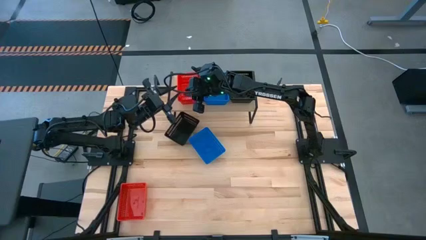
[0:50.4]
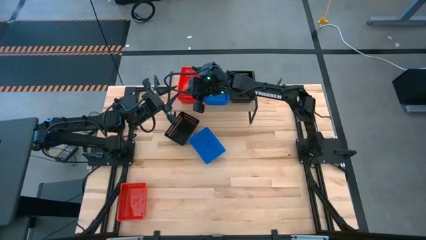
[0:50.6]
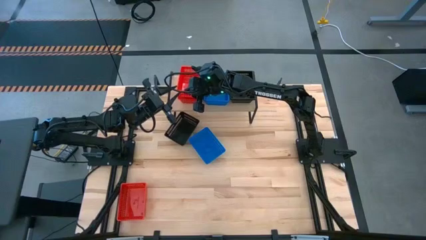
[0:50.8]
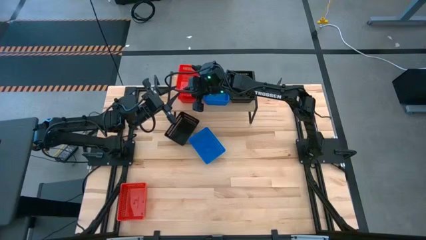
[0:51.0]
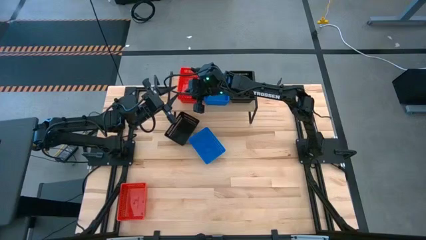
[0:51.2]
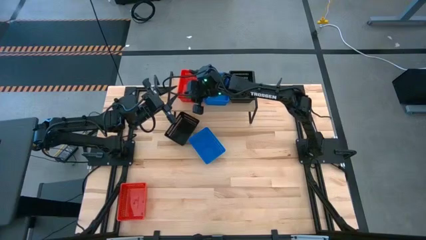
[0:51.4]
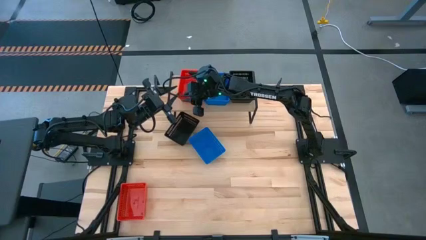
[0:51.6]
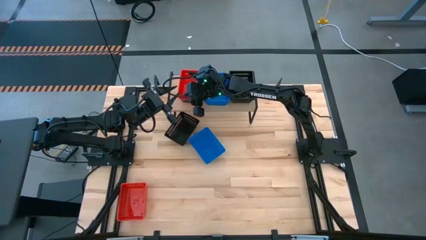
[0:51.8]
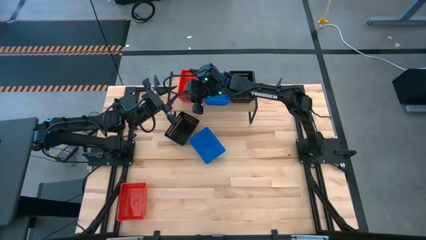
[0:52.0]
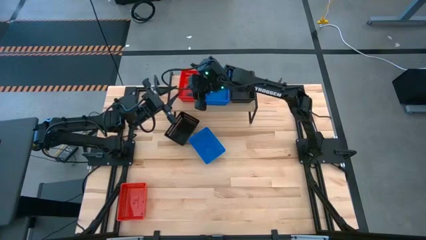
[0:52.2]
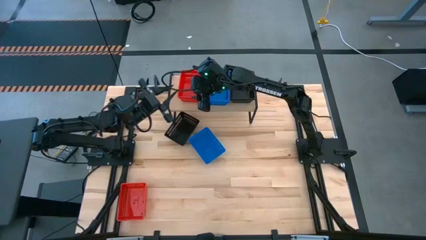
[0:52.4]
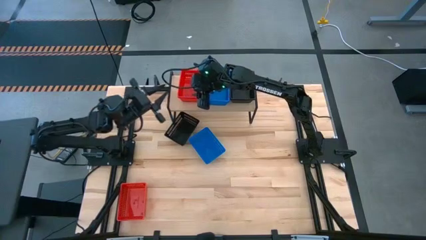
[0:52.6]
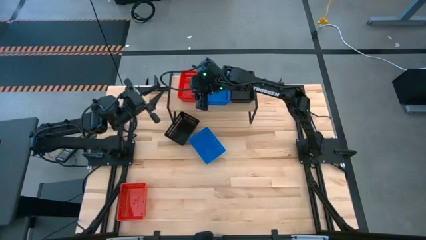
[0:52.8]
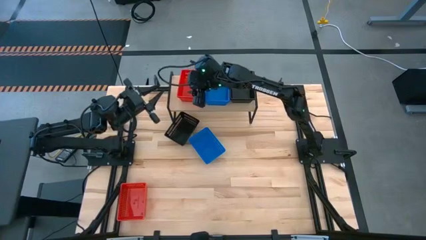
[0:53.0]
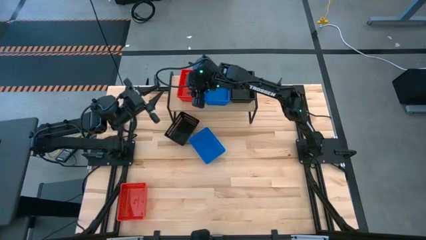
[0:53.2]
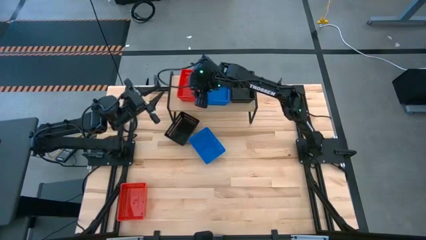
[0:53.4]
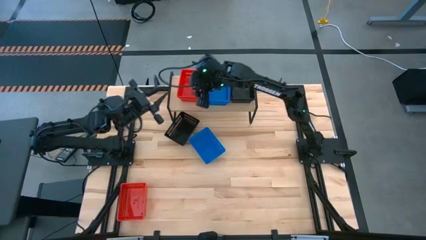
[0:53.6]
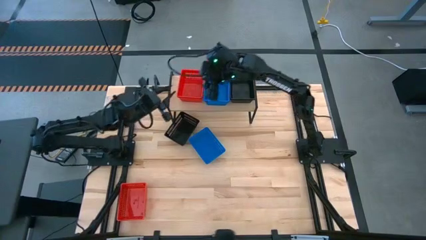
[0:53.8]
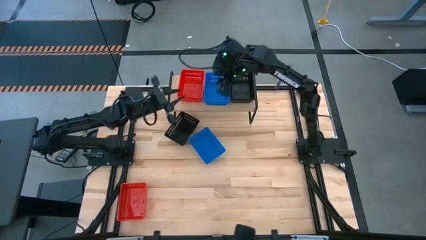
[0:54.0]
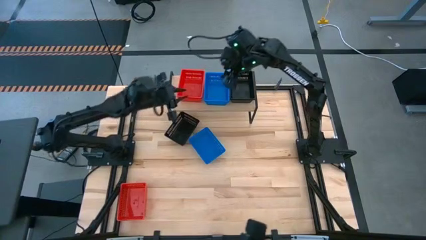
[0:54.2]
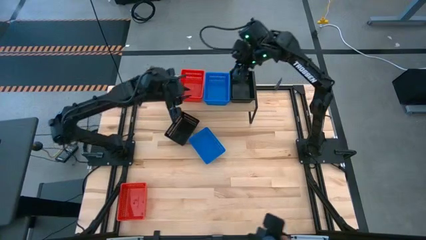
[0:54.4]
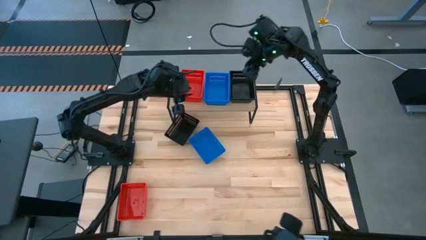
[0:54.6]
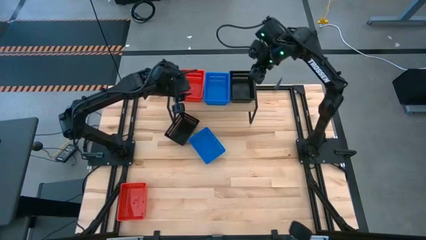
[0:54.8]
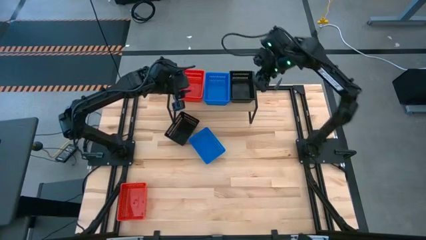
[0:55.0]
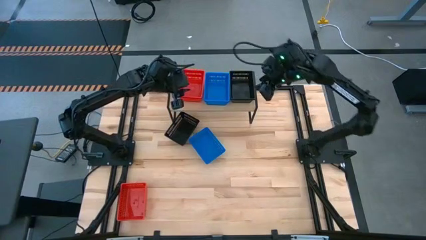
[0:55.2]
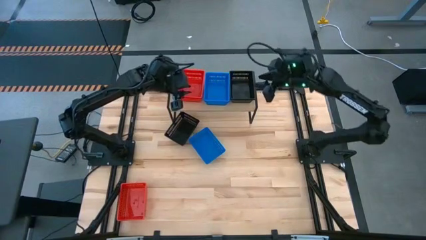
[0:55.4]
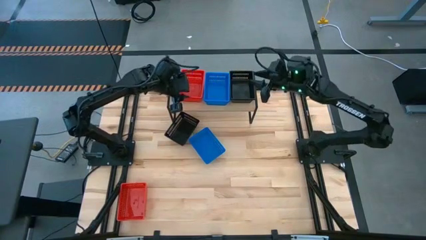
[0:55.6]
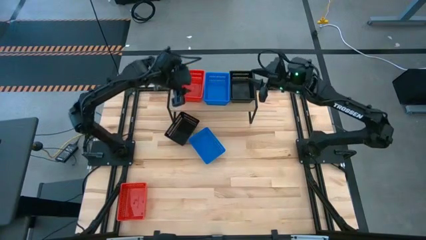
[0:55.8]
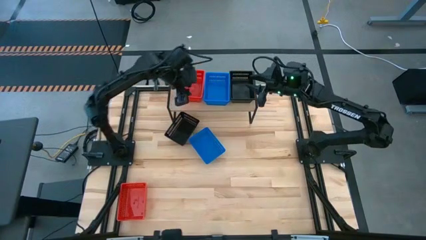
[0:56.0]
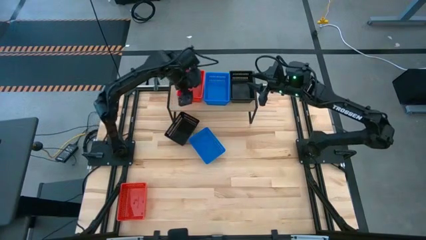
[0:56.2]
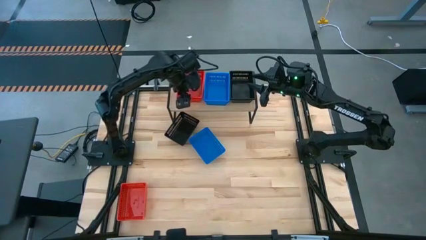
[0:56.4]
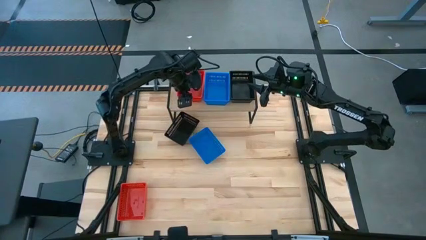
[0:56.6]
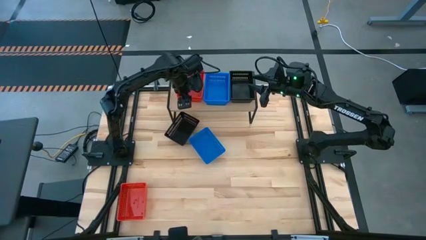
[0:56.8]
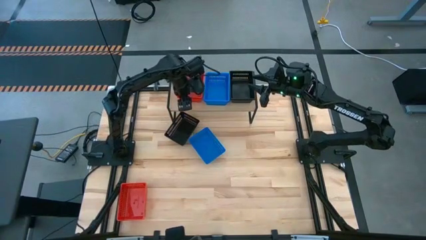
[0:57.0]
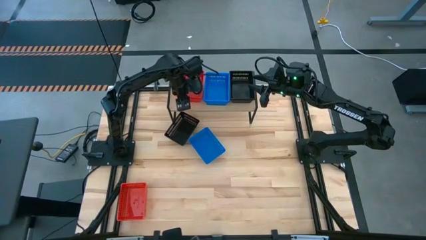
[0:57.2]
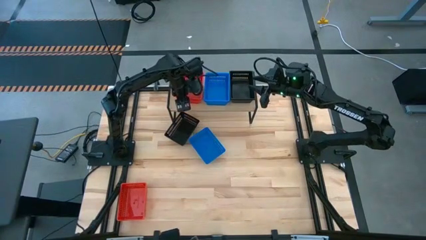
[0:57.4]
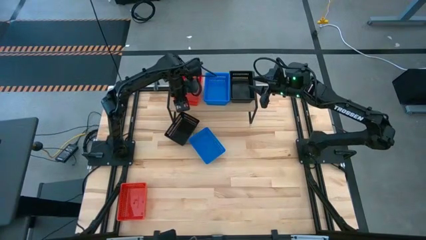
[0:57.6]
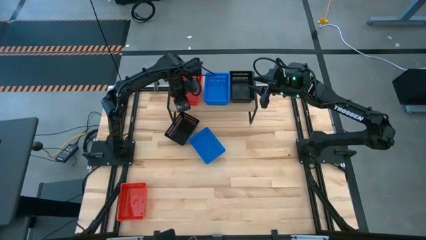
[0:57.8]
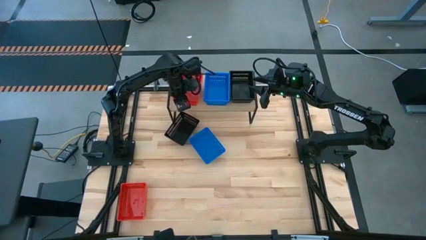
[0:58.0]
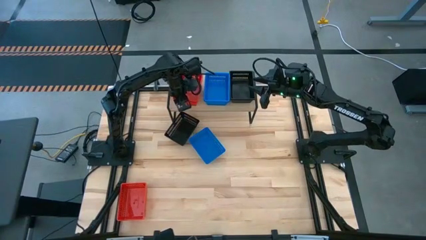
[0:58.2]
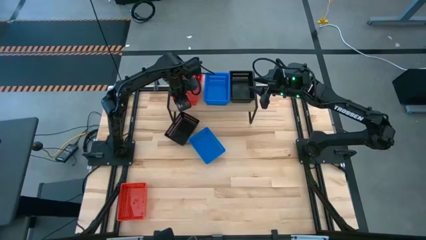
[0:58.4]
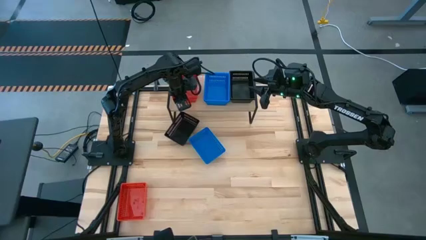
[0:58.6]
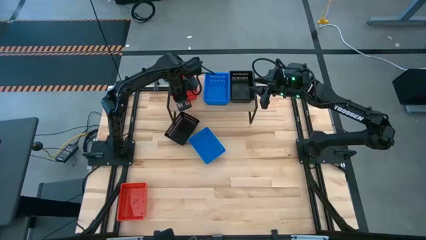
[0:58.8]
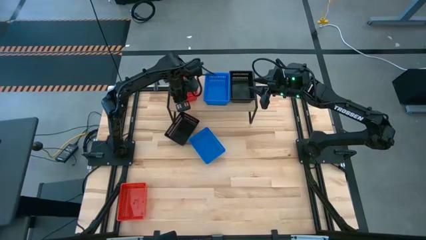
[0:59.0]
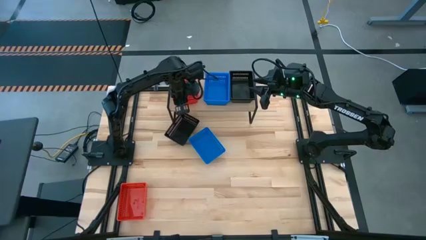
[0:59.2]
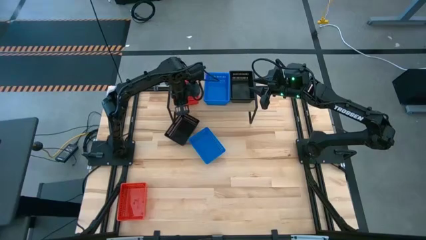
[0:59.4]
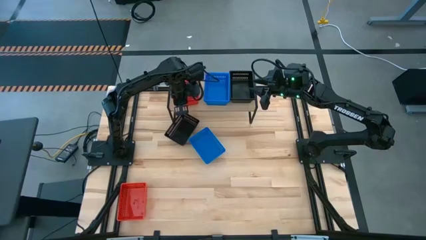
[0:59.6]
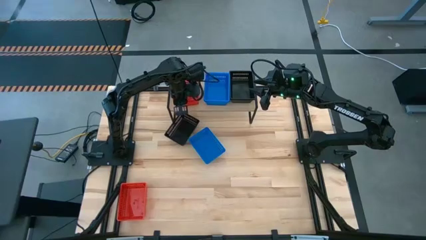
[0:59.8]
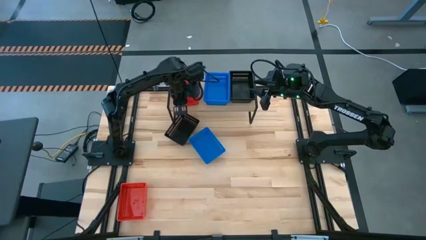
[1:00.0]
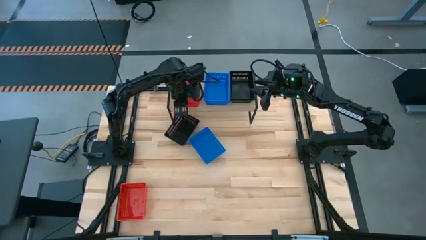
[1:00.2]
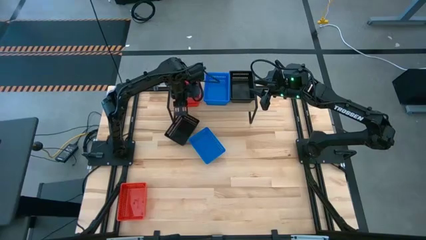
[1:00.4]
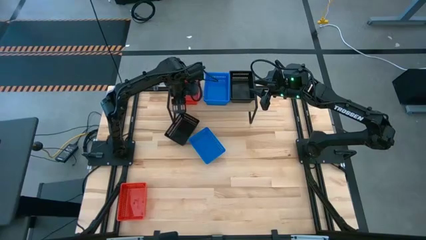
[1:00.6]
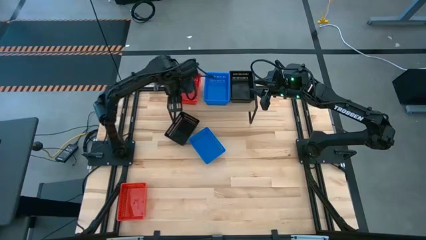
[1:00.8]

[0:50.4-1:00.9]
Task: Stack baskets on shelf by color
Stack the right red bin on top of the red bin on the shelf

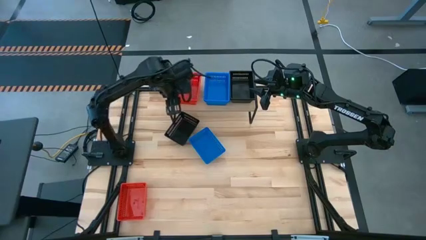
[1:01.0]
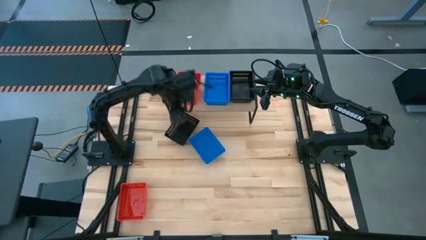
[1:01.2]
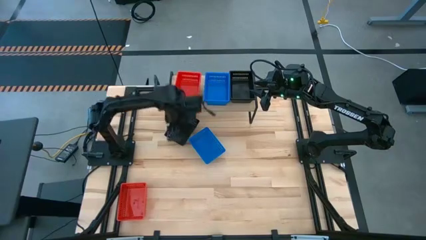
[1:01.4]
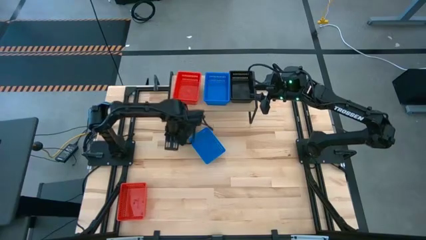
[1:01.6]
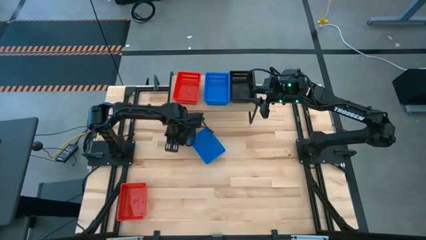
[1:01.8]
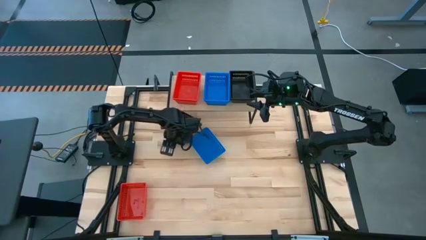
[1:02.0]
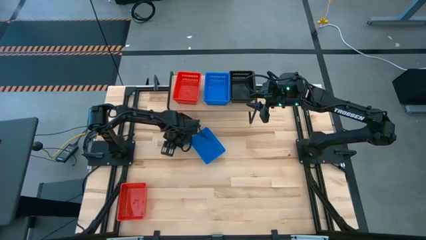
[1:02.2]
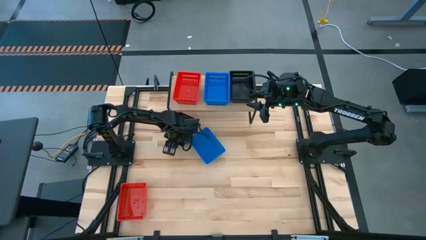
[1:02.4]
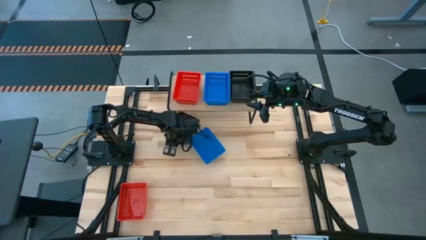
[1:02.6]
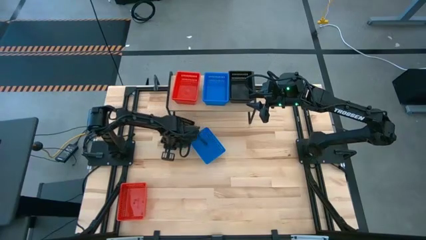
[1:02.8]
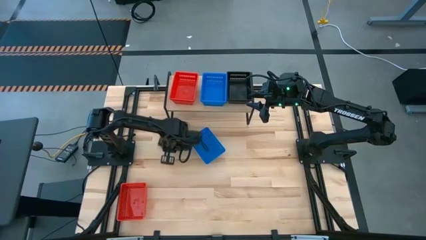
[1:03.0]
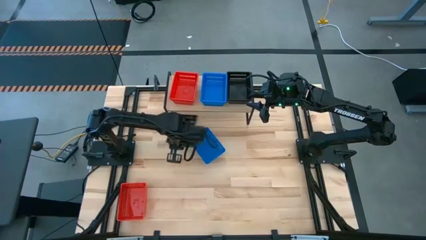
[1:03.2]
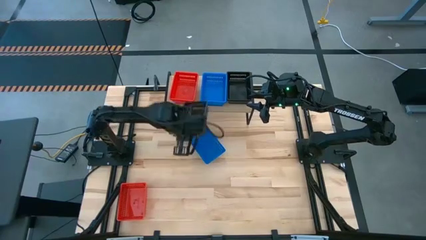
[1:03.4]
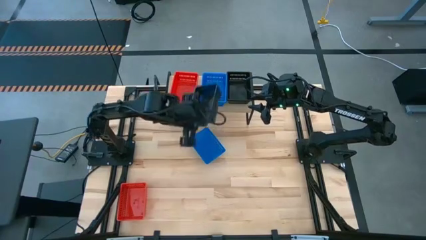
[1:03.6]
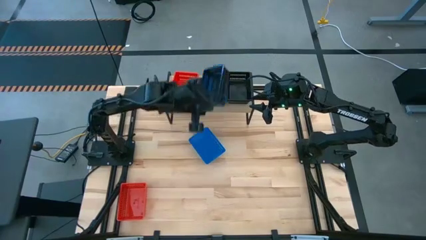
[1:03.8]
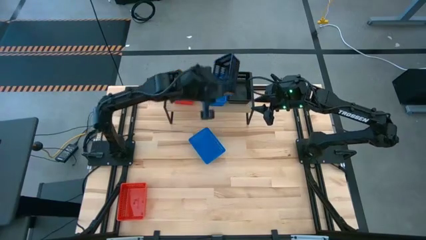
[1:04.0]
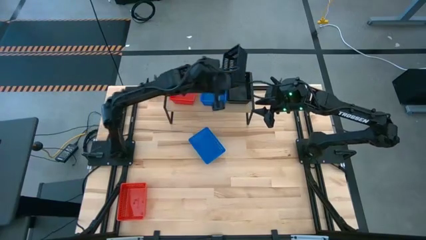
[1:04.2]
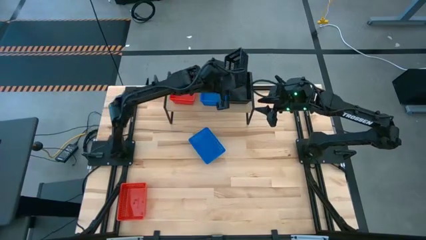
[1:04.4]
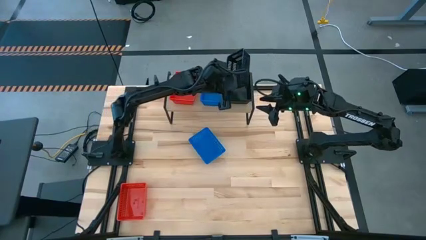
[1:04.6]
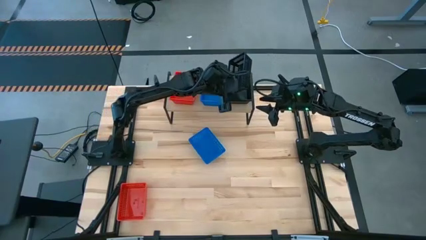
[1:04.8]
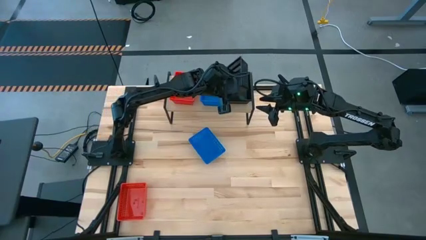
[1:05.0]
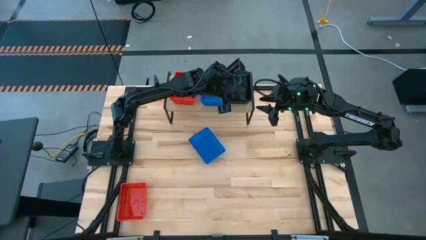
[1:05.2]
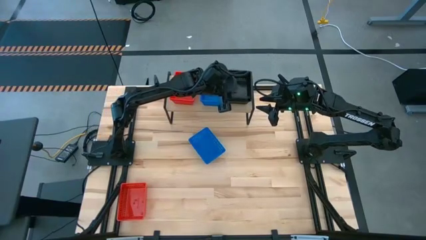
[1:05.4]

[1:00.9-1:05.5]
Stack the black bin on top of the black bin on the shelf

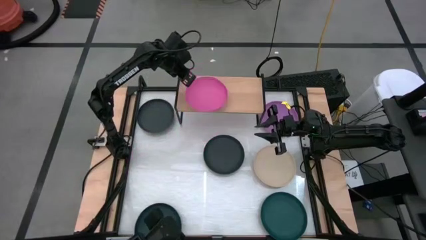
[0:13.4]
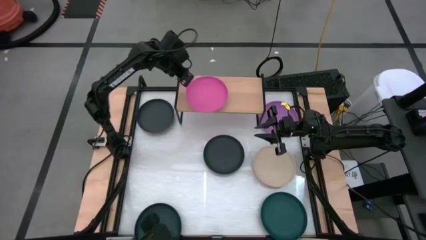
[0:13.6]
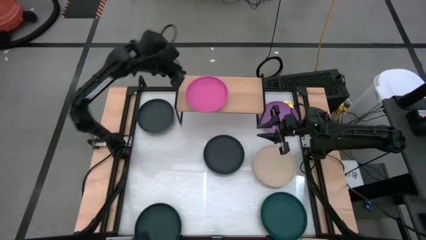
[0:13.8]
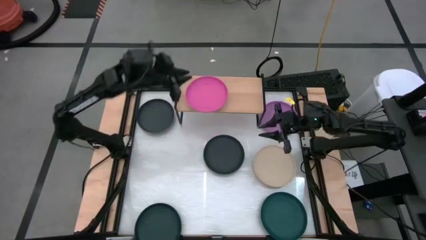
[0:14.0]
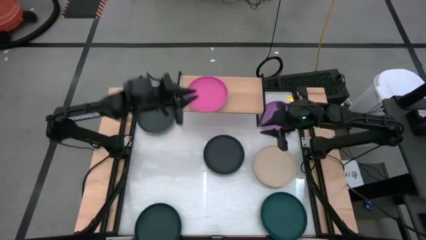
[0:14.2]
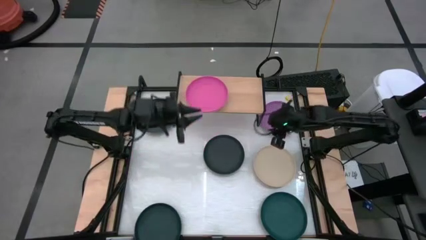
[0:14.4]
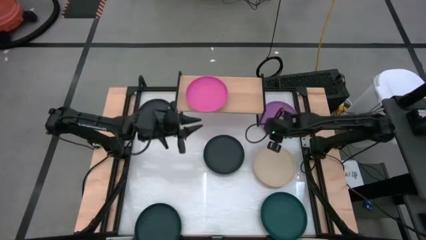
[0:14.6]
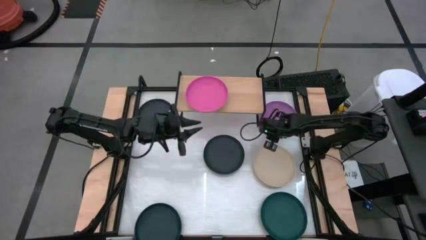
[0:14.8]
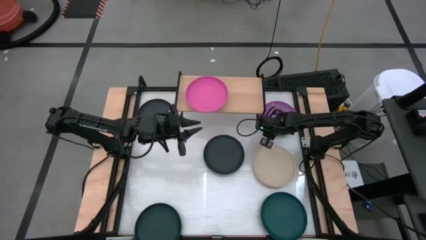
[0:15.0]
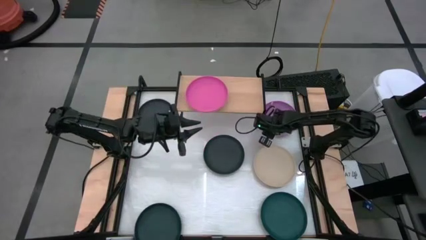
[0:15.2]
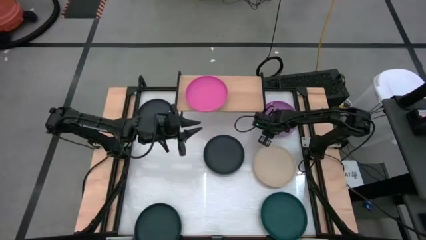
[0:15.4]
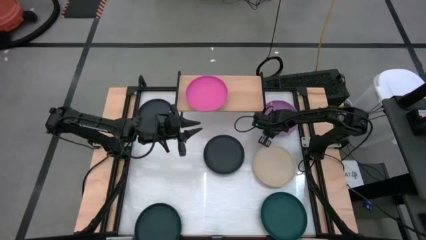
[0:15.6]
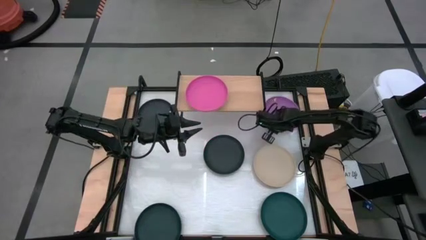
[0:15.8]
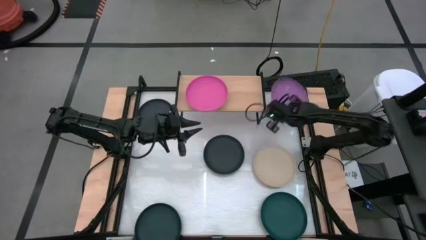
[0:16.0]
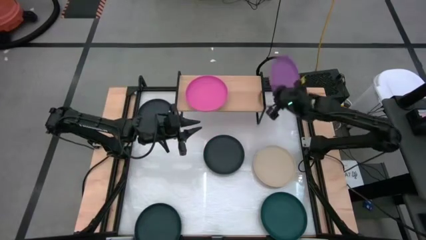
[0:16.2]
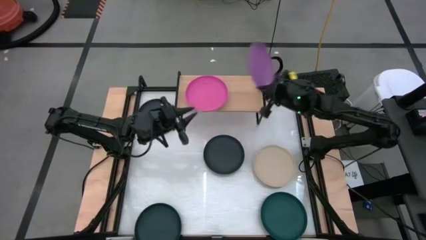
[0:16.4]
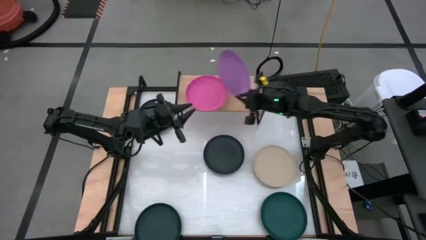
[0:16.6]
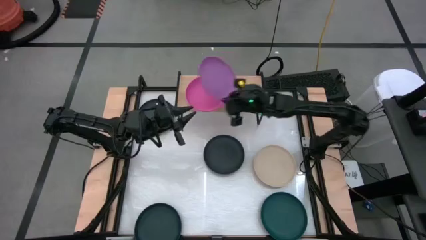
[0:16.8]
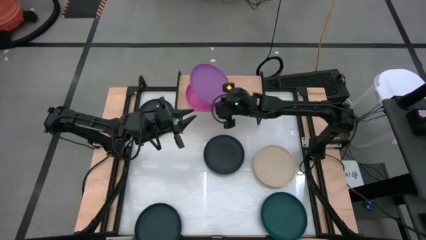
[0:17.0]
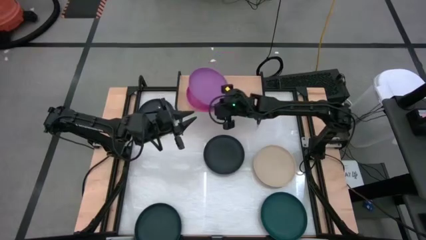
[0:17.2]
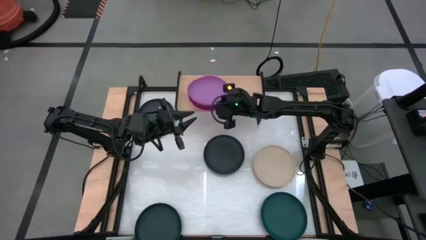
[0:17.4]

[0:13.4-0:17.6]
Task: Place and stack plates onto a shelf
Stack the purple plate on top of the pink plate on the shelf
